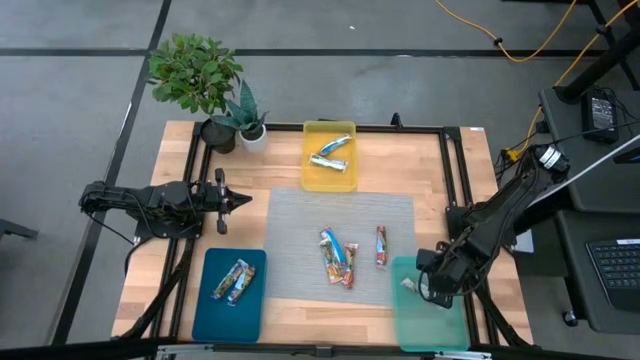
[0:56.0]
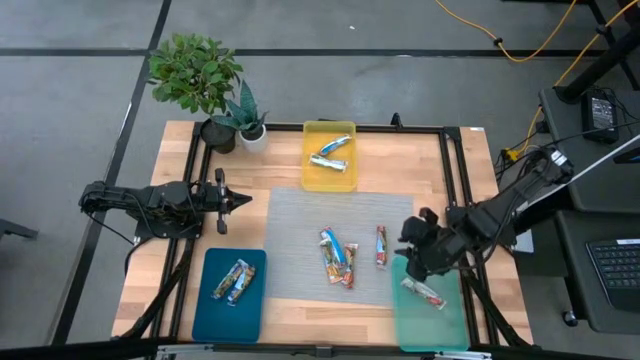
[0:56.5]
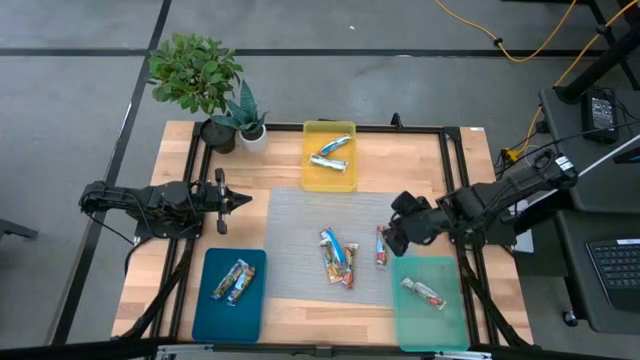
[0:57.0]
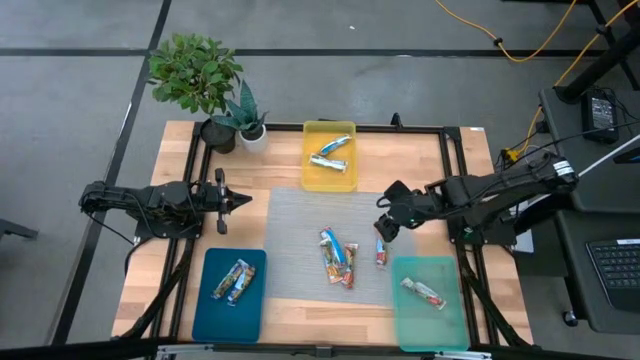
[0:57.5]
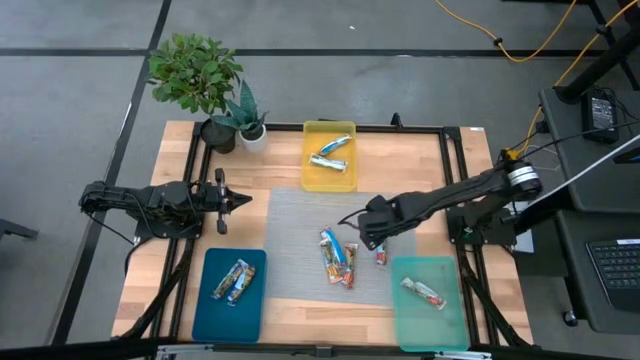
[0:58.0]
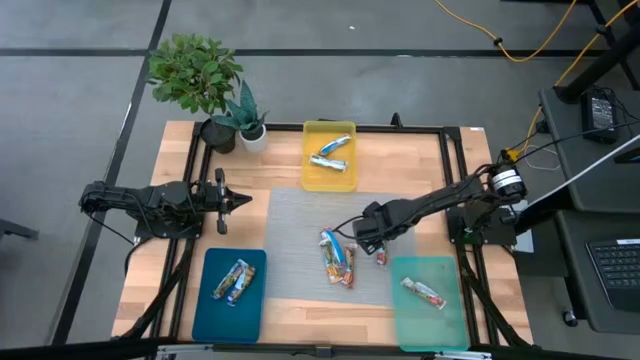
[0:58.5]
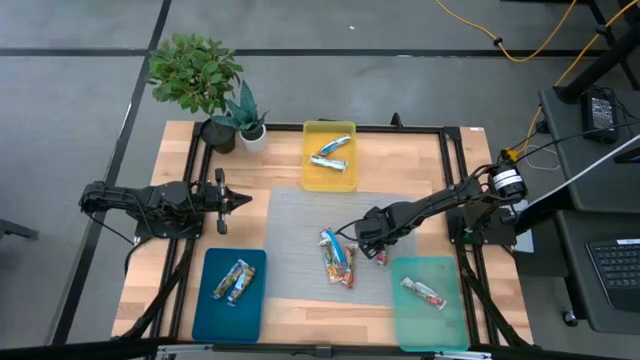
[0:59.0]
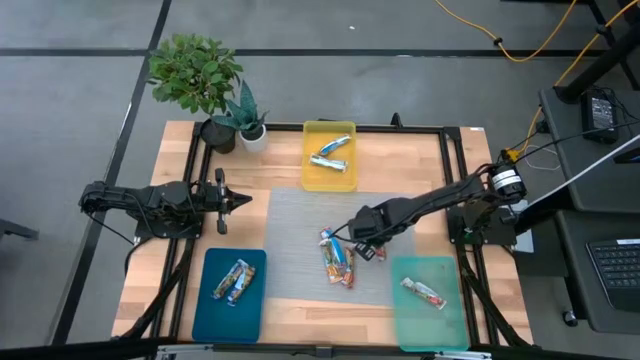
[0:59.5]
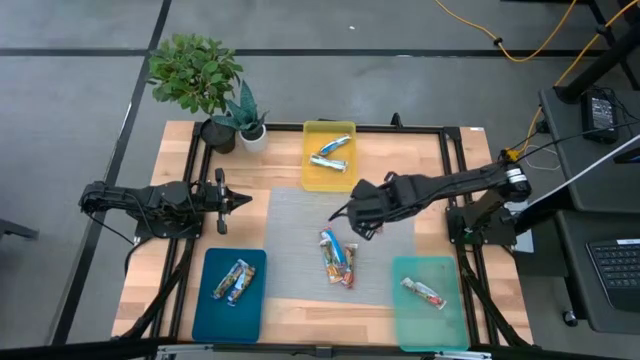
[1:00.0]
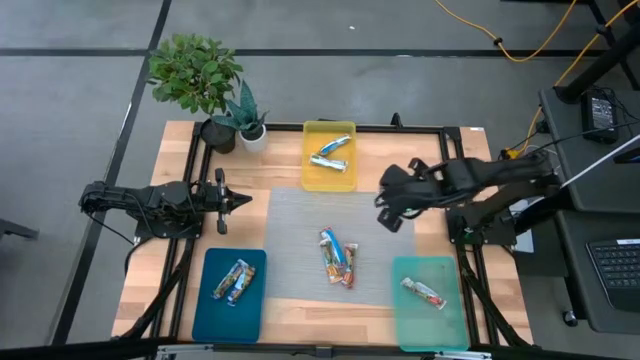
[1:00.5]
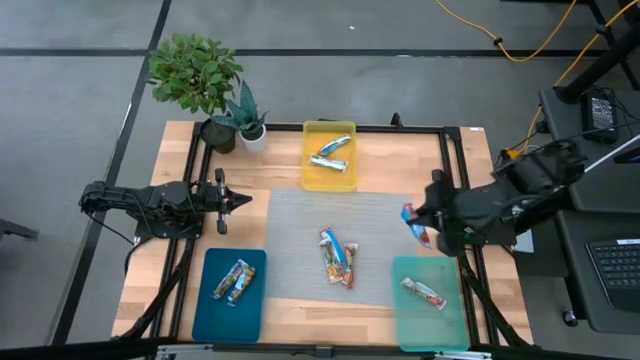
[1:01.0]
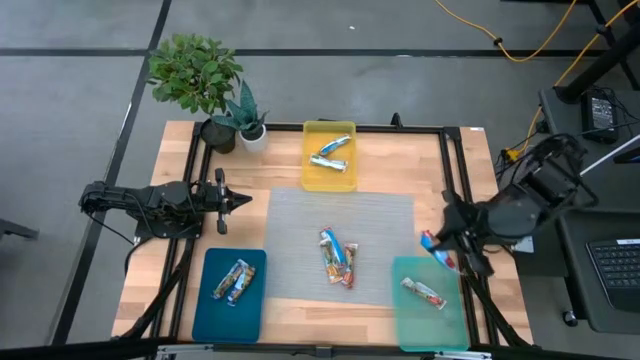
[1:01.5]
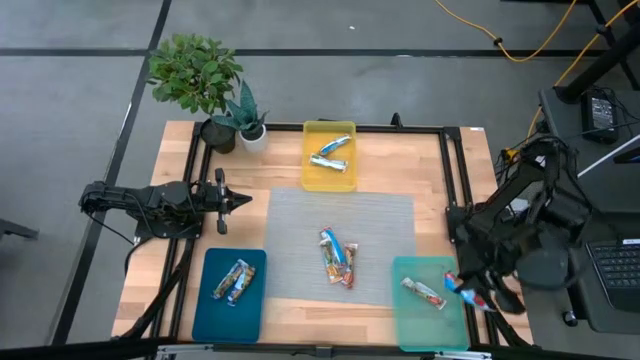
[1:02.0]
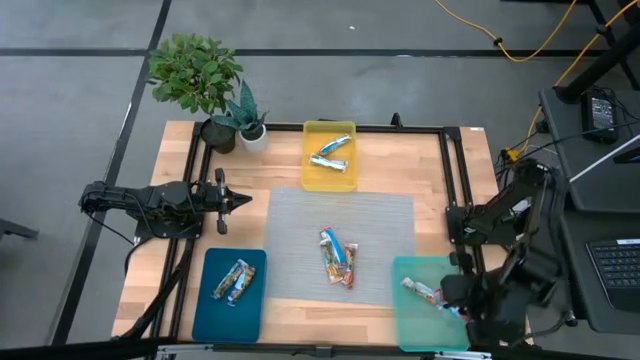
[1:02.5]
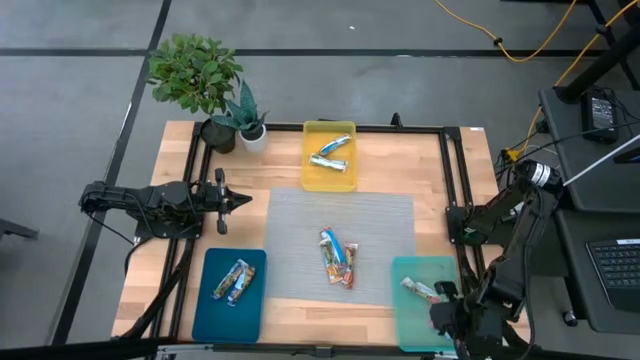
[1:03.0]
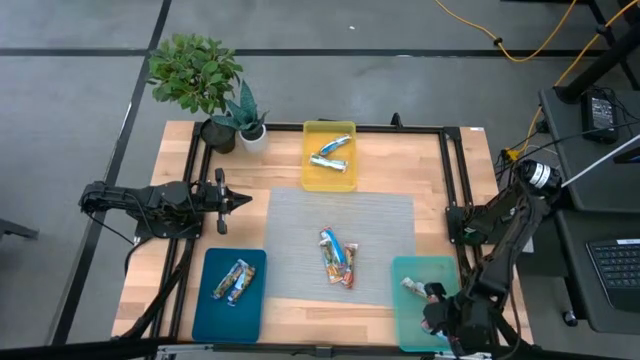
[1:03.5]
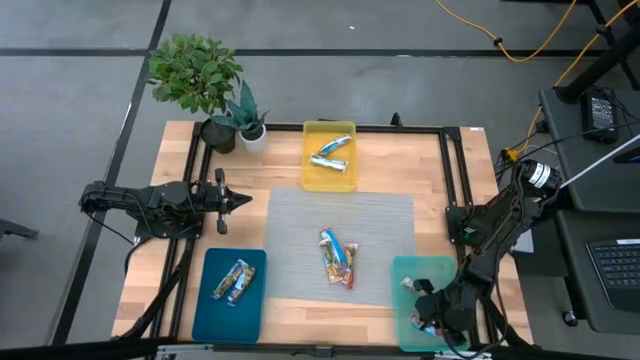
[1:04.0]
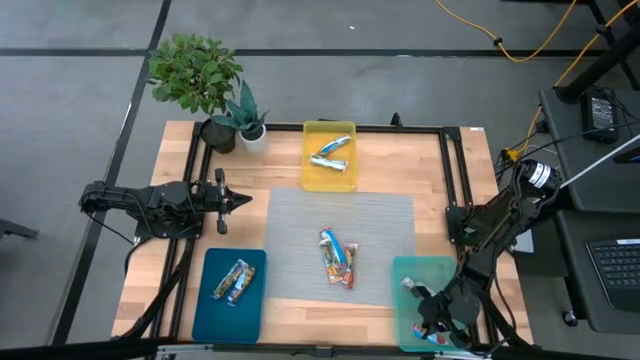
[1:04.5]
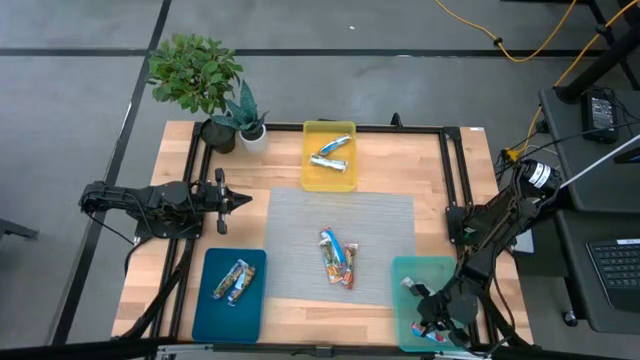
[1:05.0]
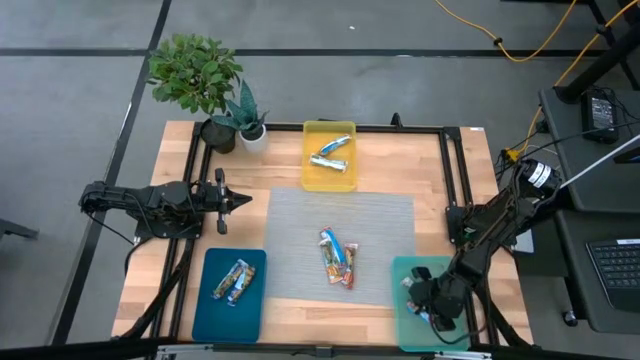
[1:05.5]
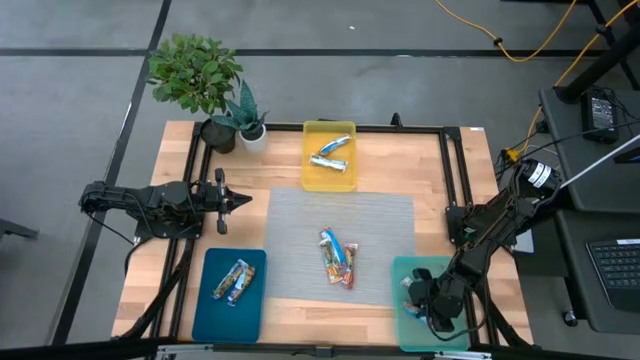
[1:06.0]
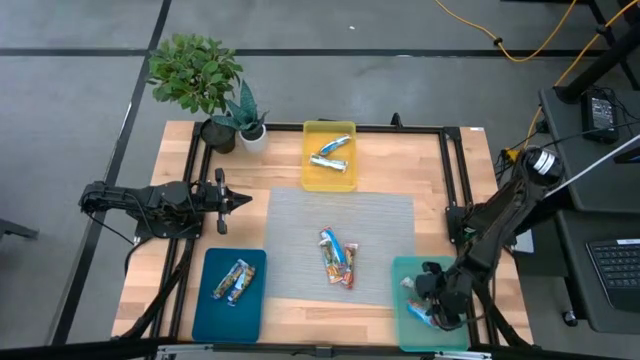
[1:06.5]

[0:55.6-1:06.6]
Task: Pick and place Granola Bars by type
Put the right red granola bar into the light blue bin

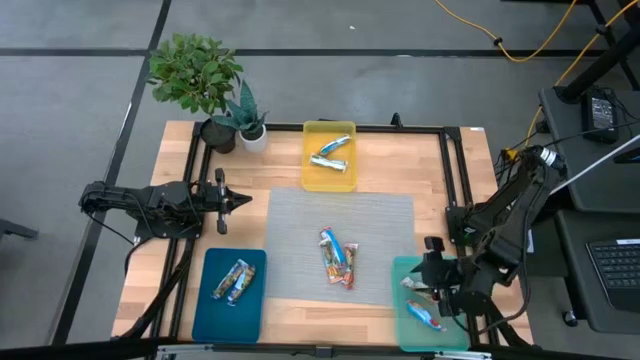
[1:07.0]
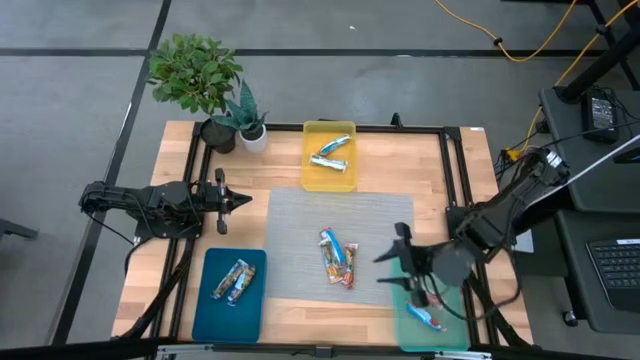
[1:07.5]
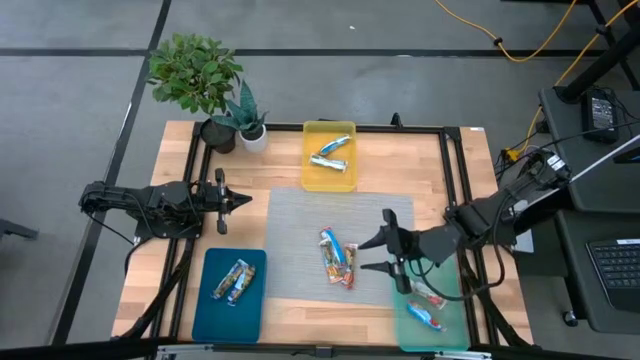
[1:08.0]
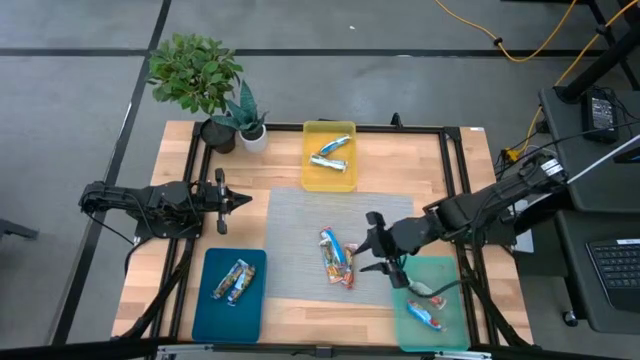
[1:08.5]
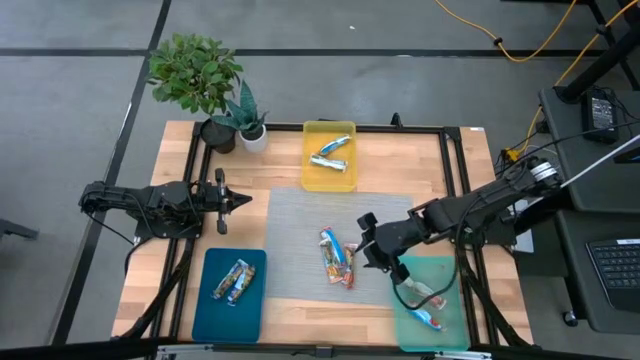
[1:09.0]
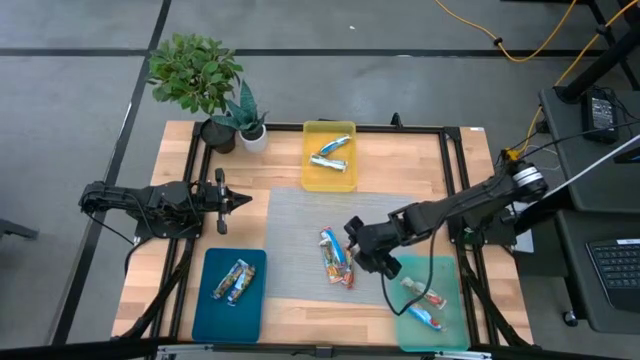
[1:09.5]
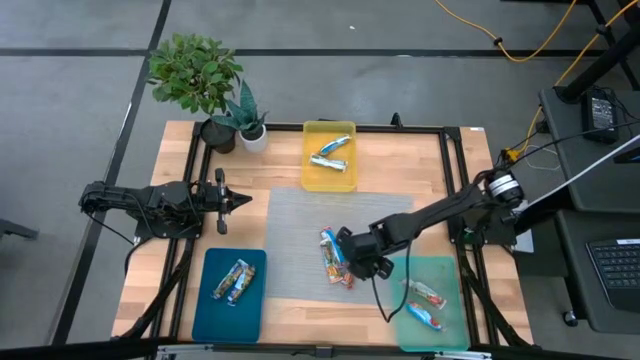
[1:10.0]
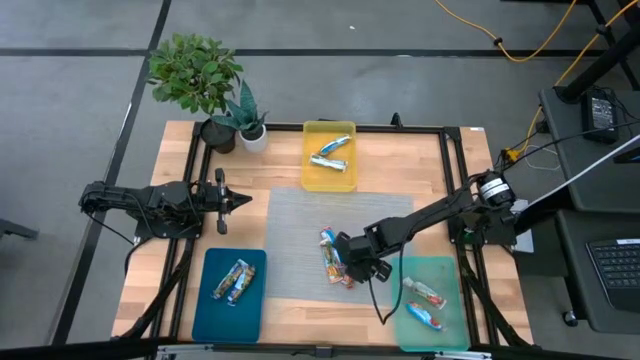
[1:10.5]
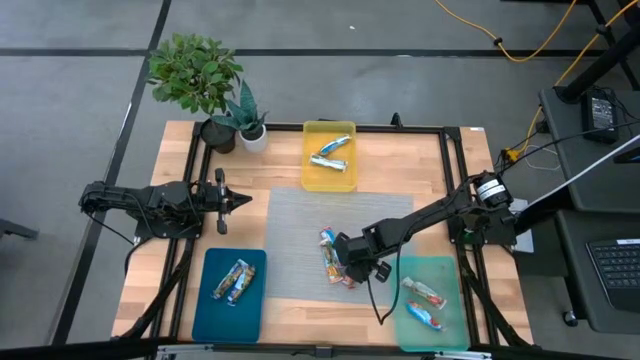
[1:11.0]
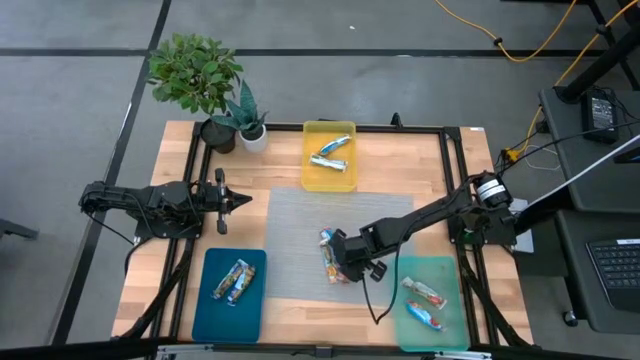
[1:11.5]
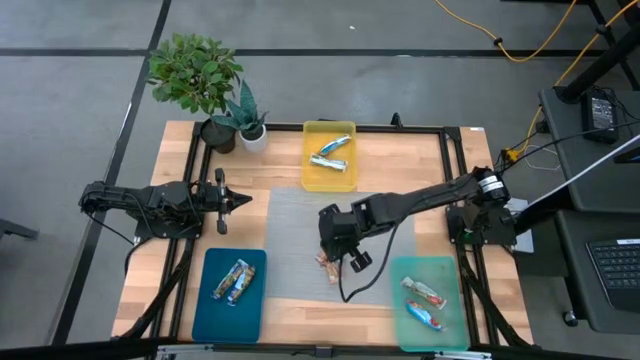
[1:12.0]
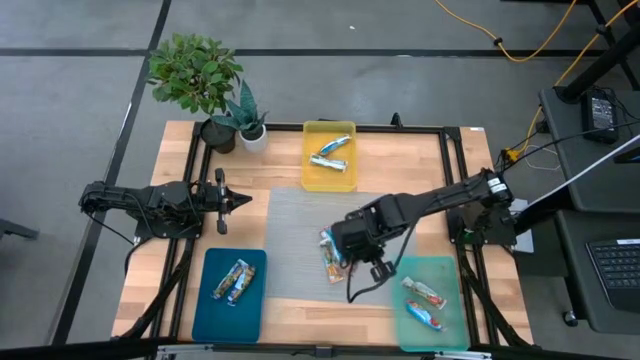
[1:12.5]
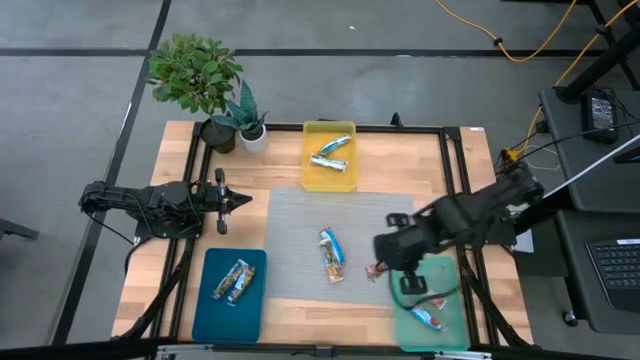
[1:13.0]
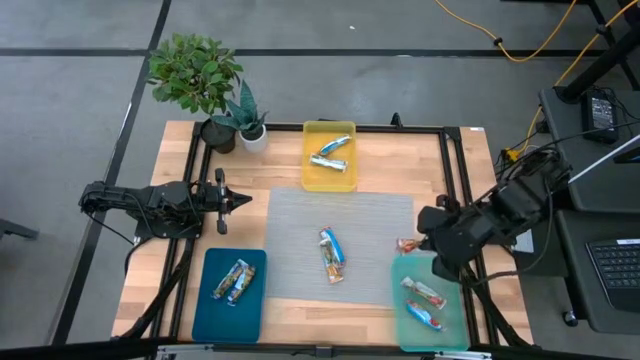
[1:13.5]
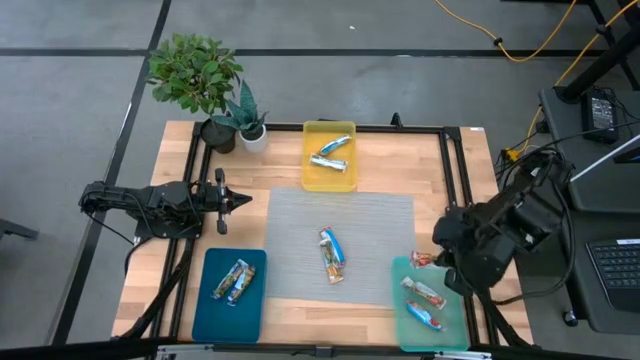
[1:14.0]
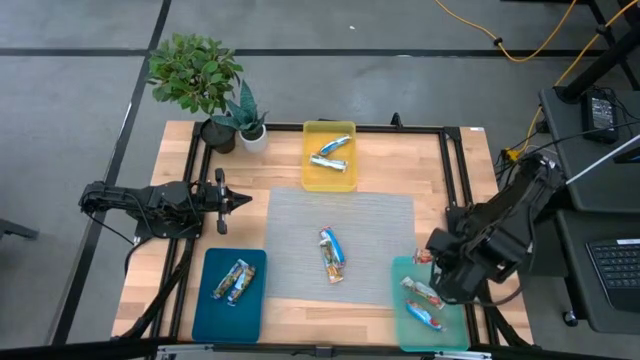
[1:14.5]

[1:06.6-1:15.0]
Put the right red granola bar into the light blue bin

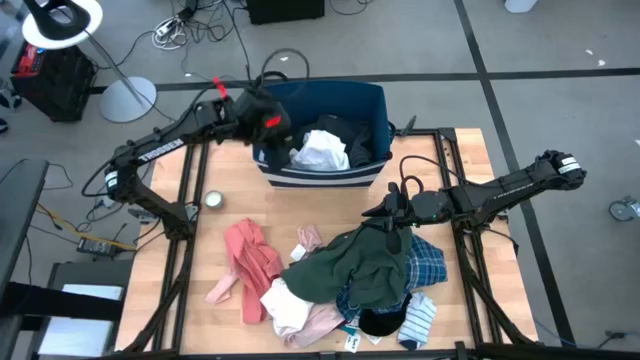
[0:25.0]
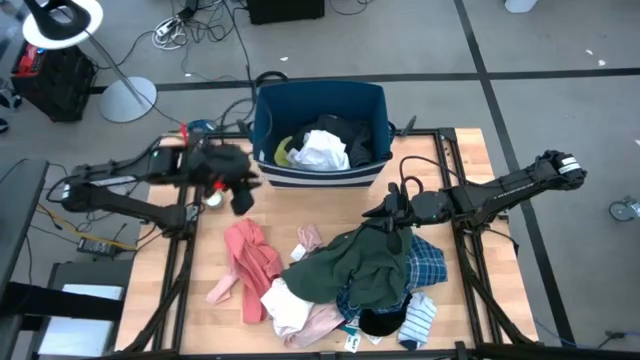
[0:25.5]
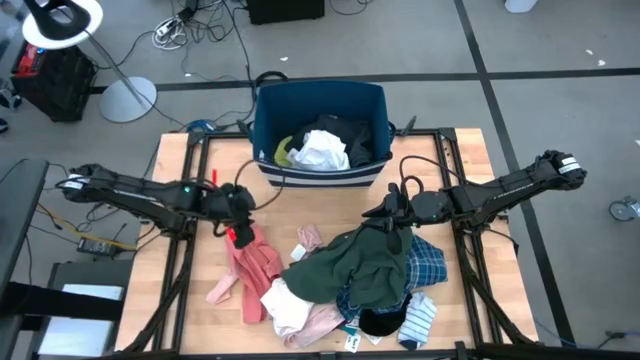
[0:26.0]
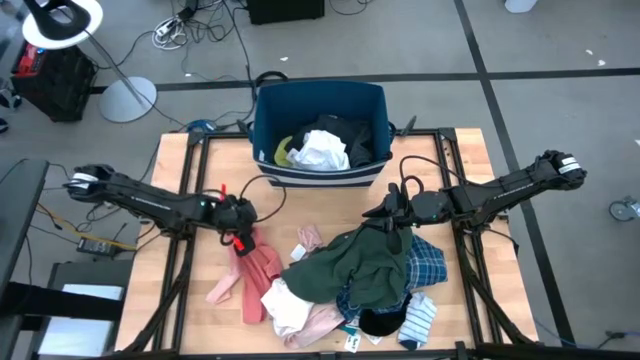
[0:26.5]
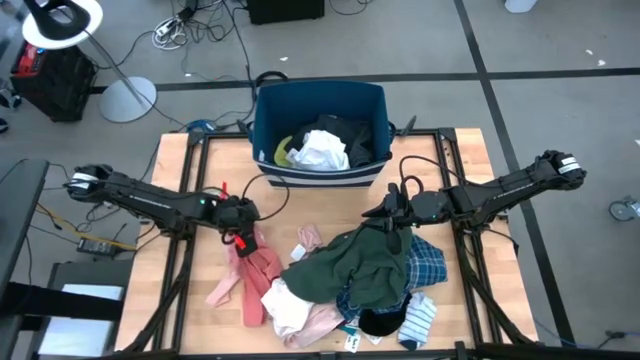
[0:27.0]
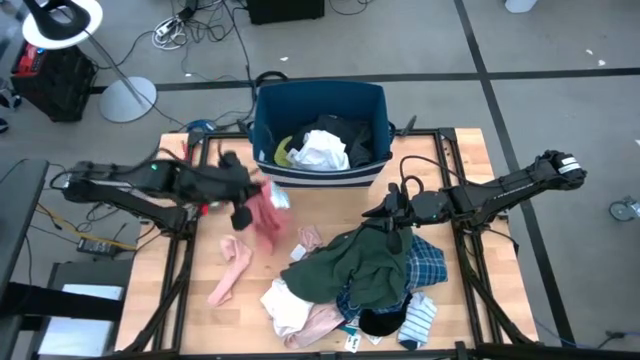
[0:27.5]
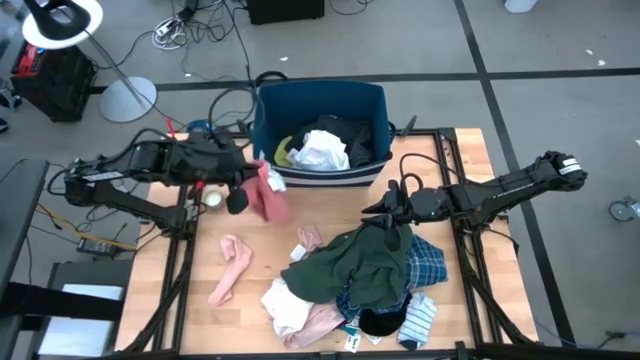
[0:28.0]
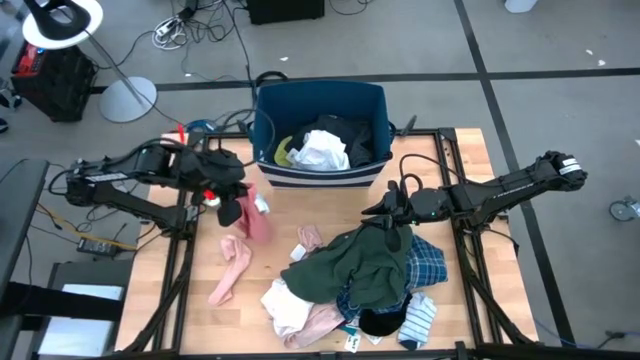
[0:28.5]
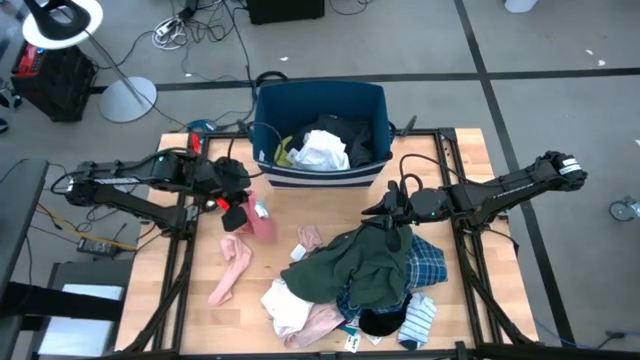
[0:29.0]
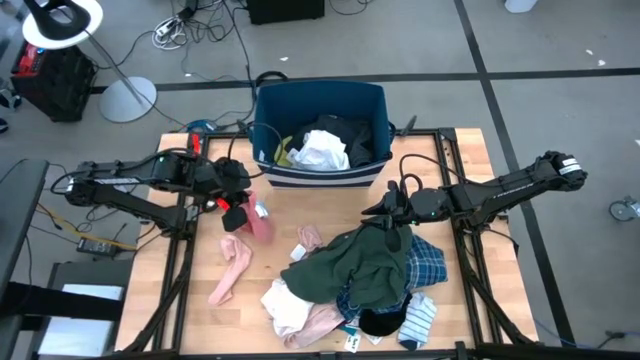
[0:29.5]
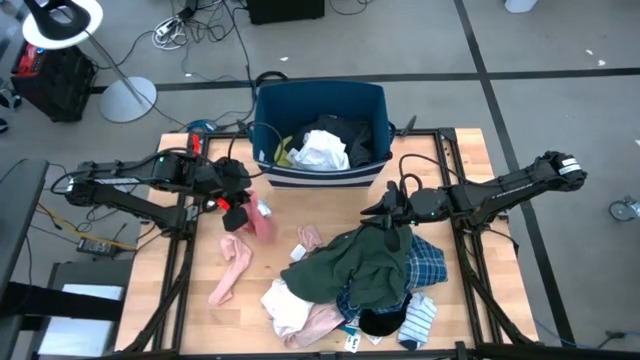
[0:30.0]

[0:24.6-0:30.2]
Task: Sort clothes
Put the dark pink boxer into the blue laundry organizer
